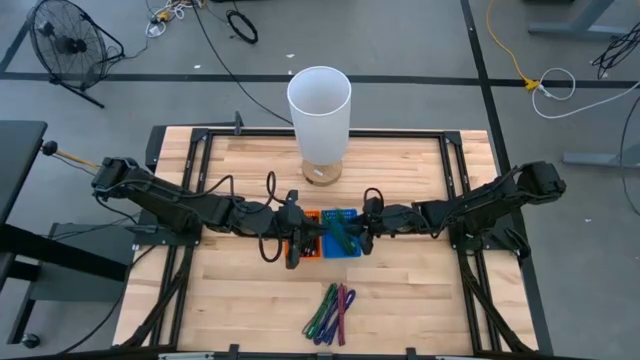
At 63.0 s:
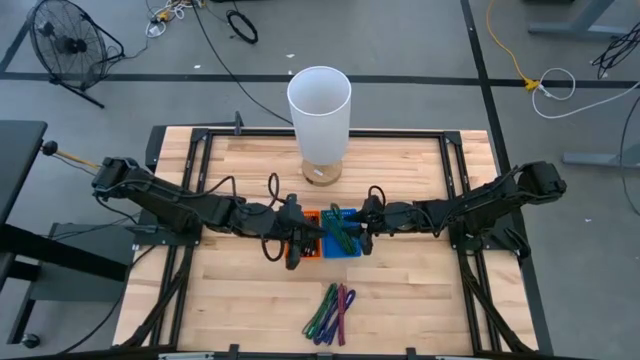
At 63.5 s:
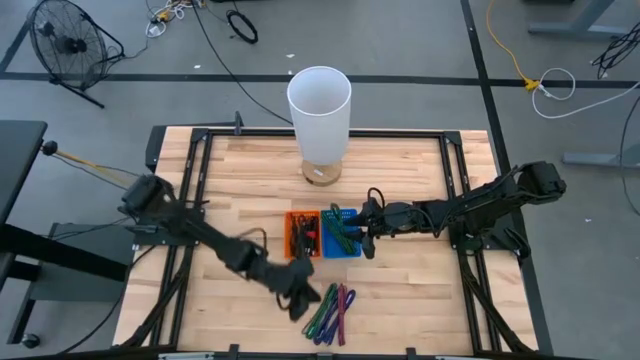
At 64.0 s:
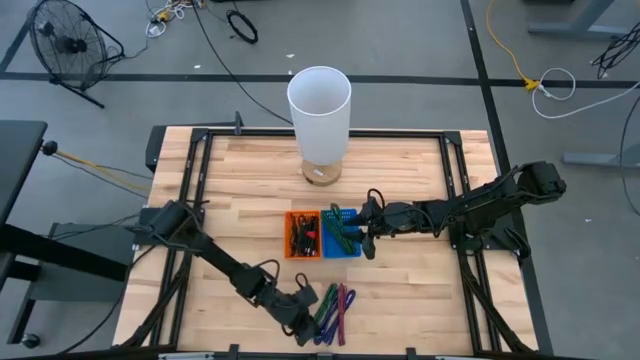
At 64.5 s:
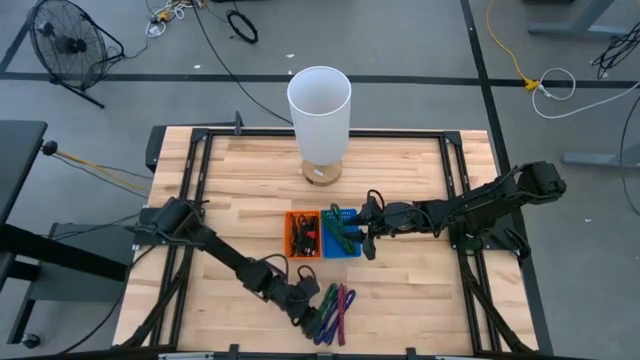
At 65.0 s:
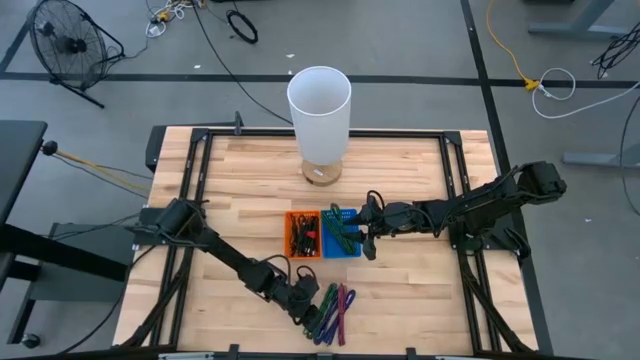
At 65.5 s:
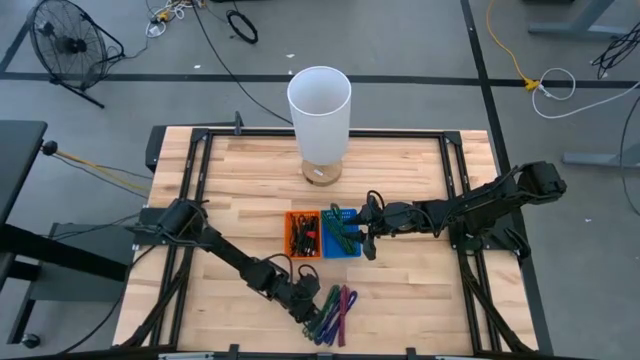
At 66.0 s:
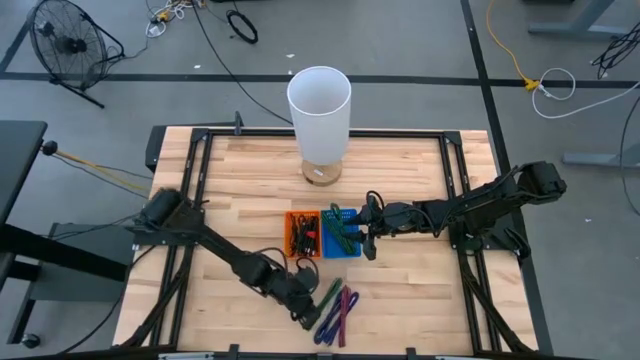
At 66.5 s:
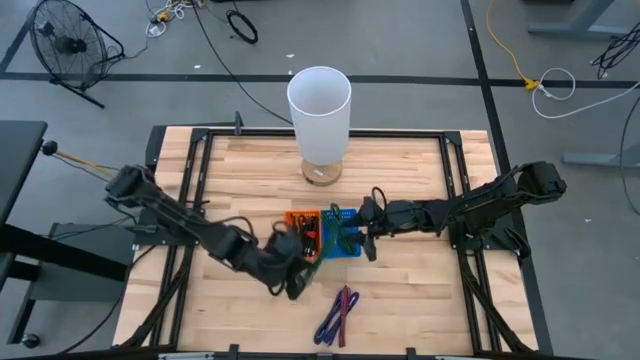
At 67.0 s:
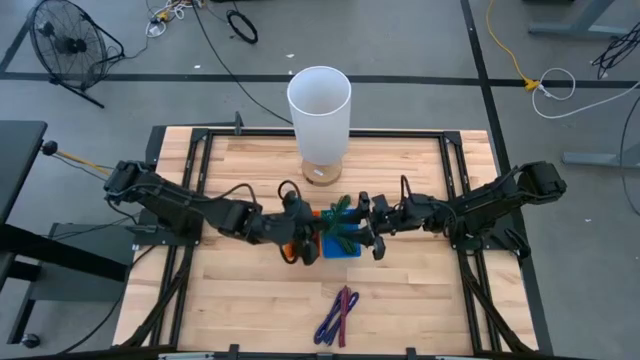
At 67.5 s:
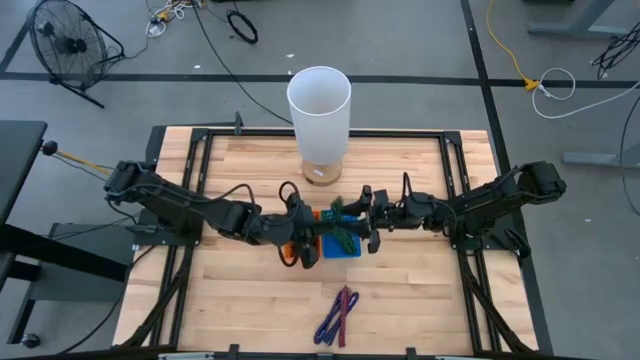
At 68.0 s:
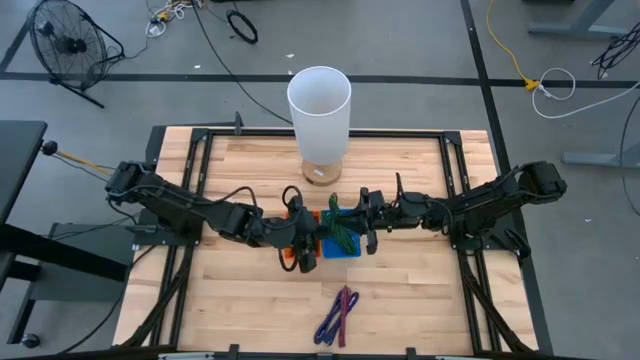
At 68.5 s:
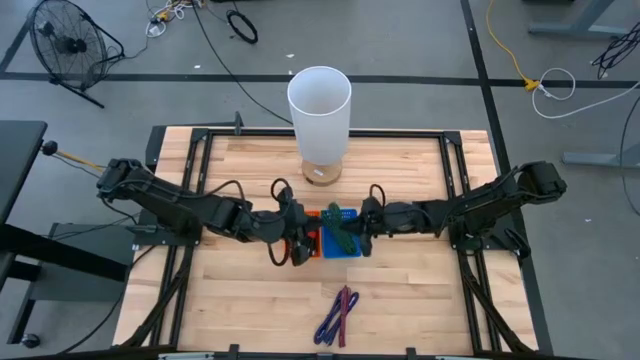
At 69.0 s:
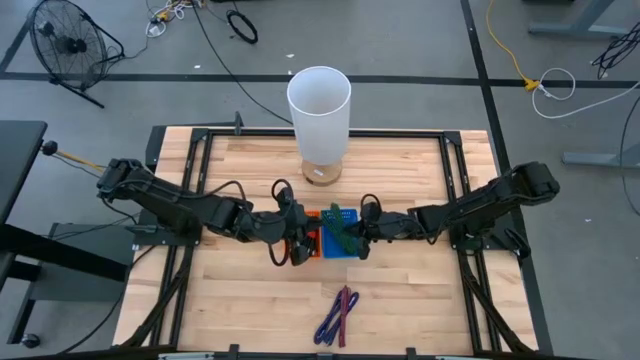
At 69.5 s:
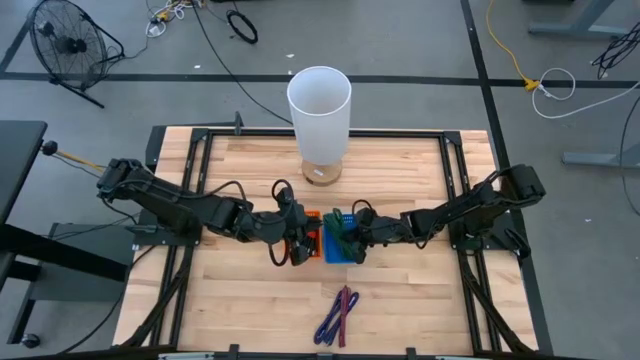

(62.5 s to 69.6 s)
Task: Pick & Place USB Port
Put the green USB cable into the blue bin

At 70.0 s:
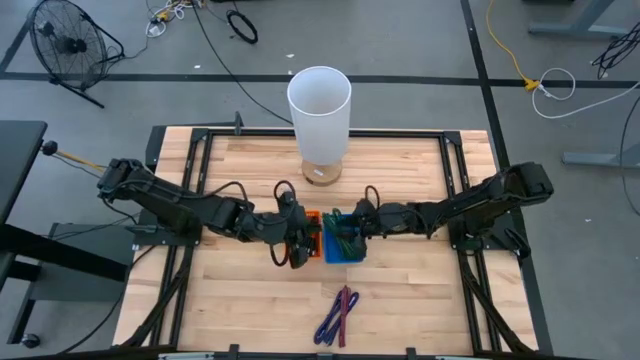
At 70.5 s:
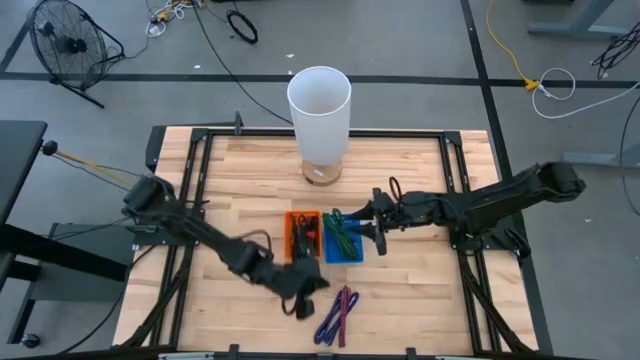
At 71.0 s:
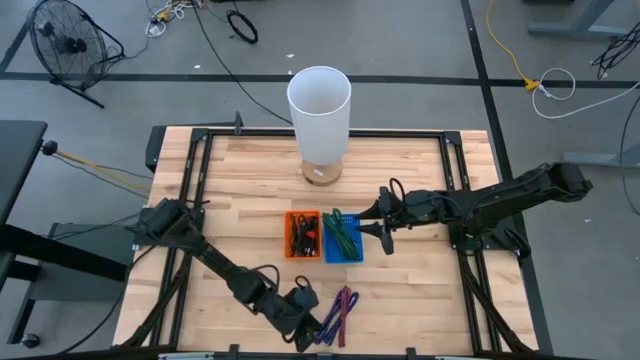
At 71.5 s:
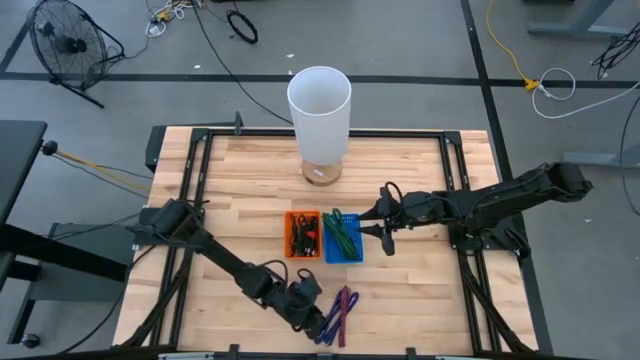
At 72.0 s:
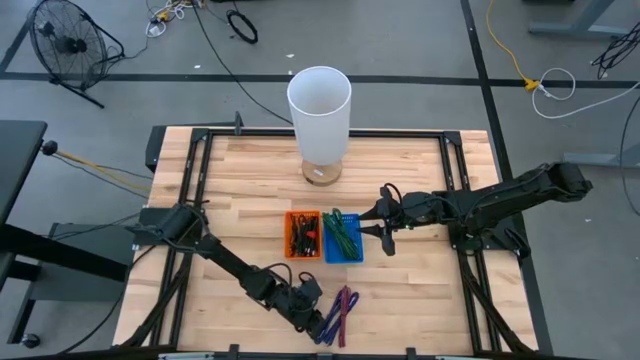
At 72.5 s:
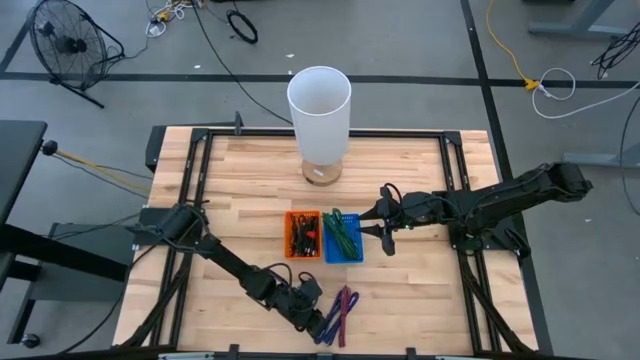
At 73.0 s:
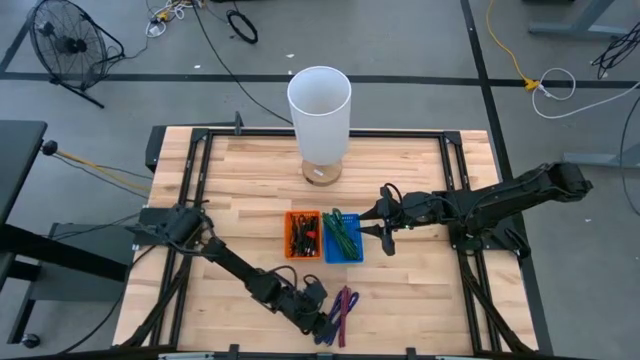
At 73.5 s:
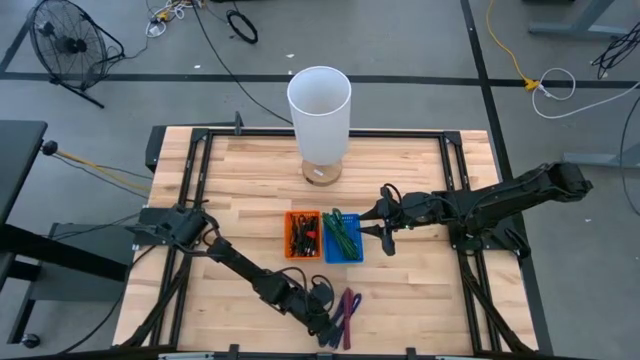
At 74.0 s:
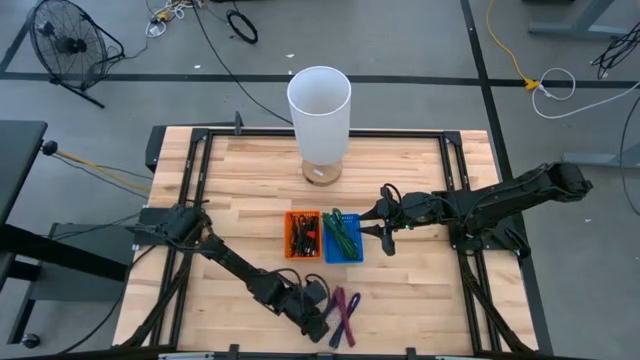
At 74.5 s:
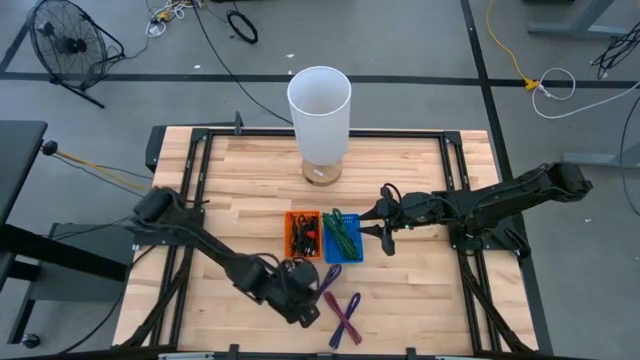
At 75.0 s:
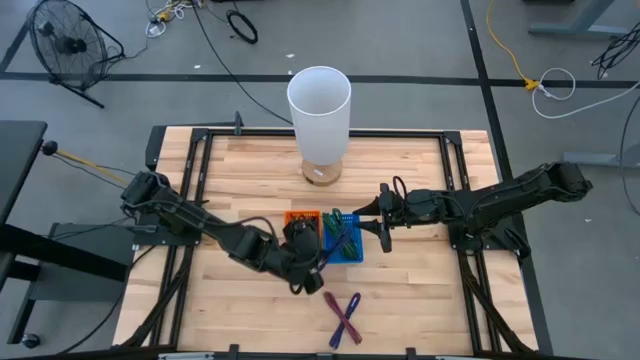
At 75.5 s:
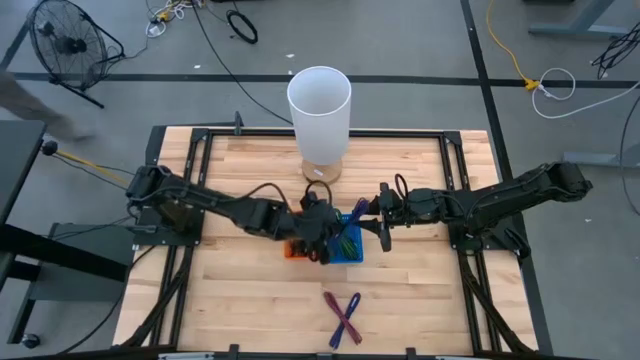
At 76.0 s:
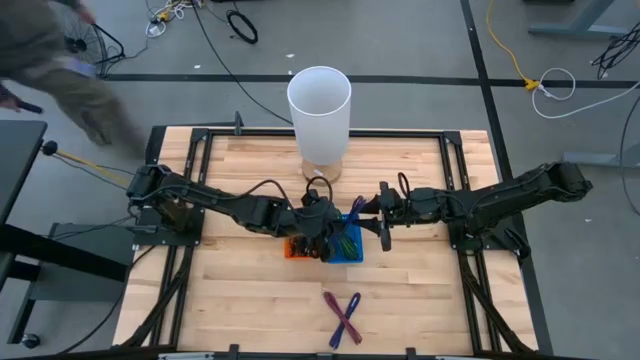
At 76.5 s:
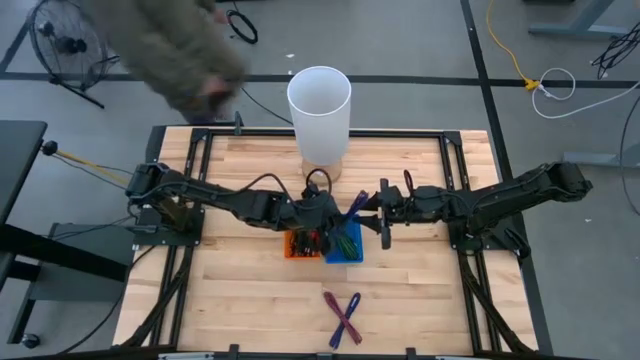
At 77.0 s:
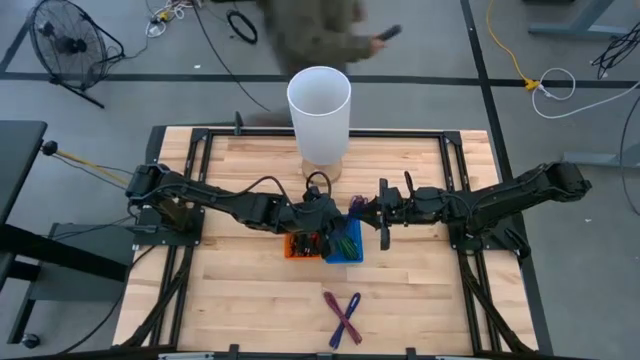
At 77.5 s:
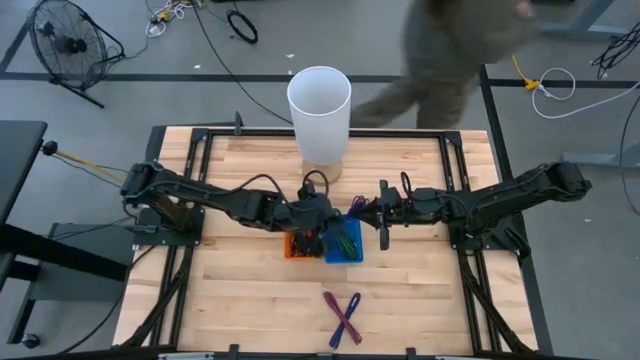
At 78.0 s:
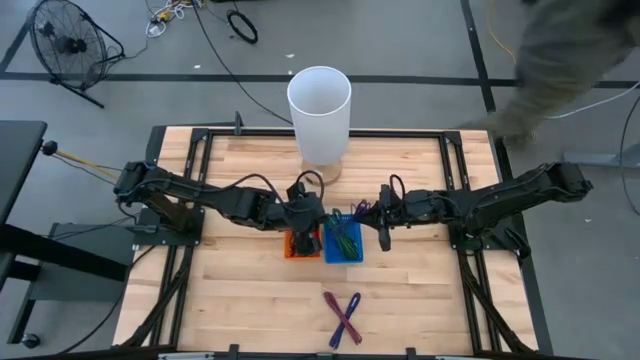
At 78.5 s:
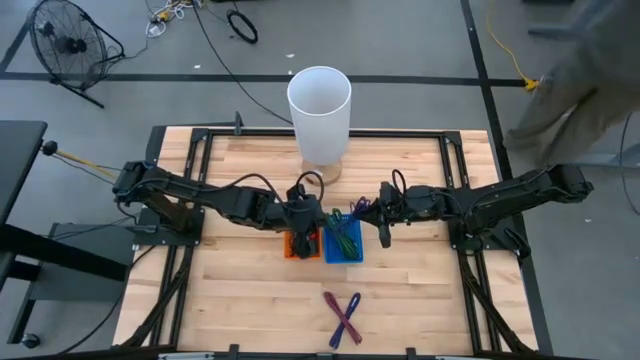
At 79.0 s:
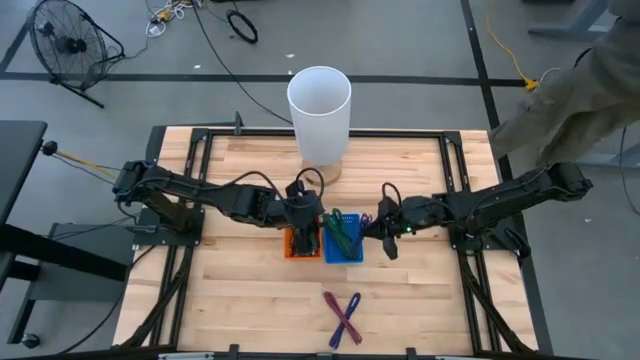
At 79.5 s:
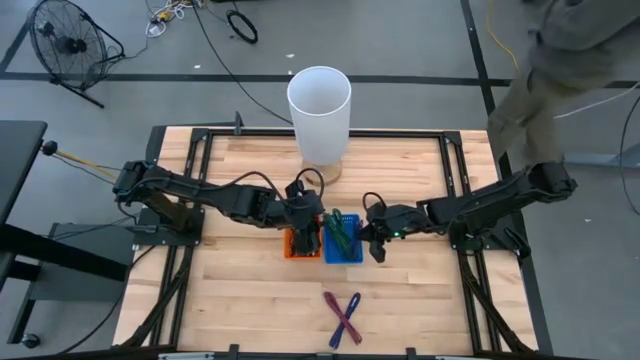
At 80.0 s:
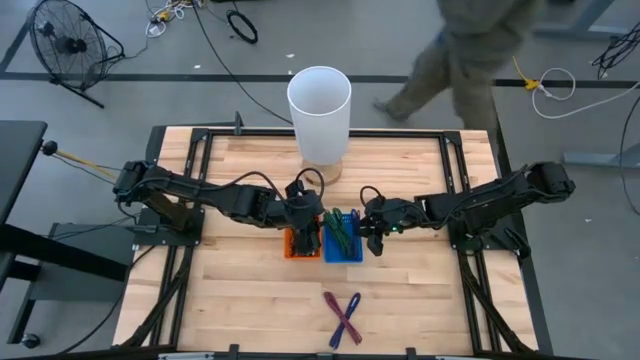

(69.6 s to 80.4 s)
Put the blue USB cable into the blue bin

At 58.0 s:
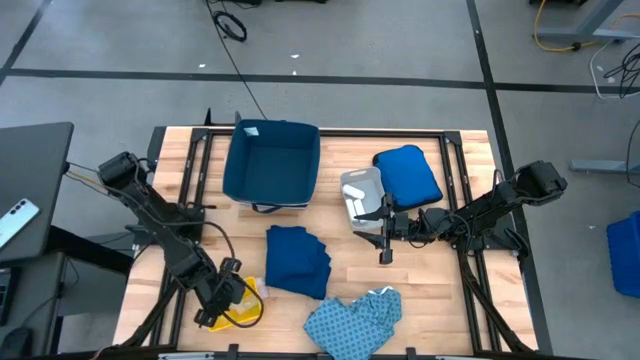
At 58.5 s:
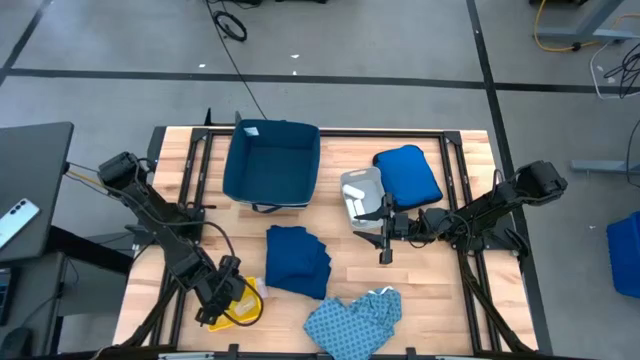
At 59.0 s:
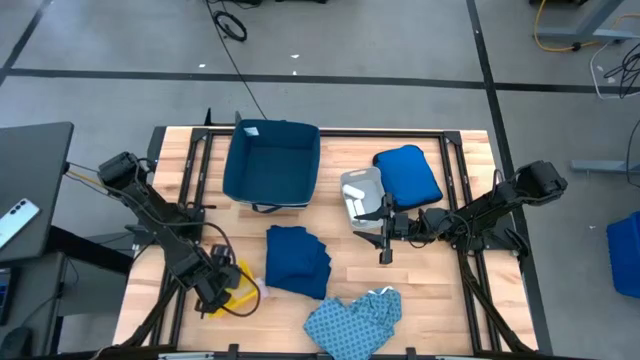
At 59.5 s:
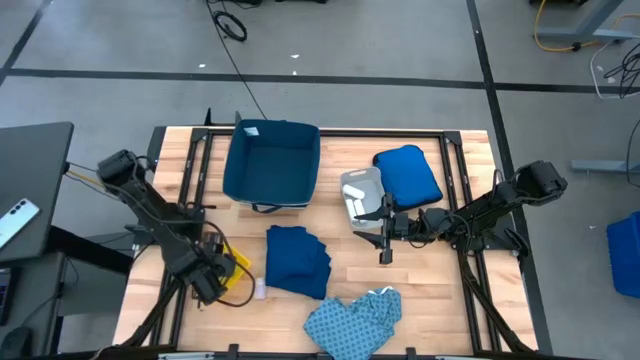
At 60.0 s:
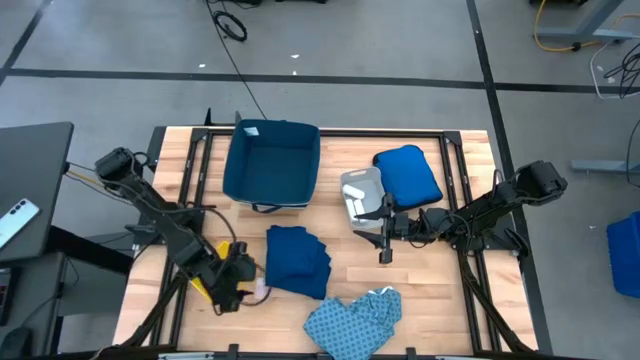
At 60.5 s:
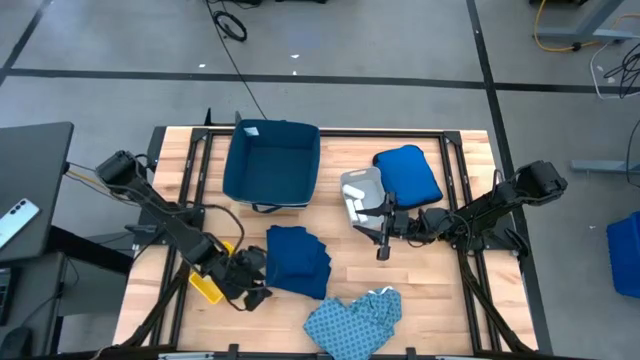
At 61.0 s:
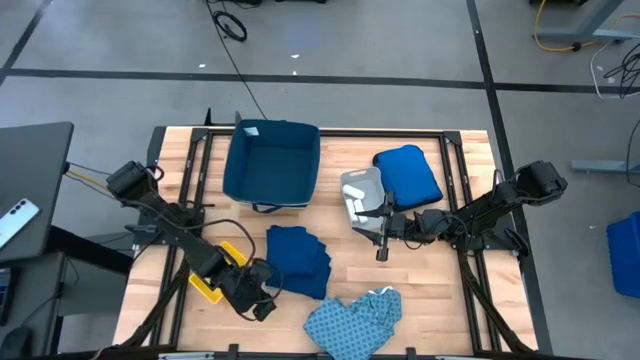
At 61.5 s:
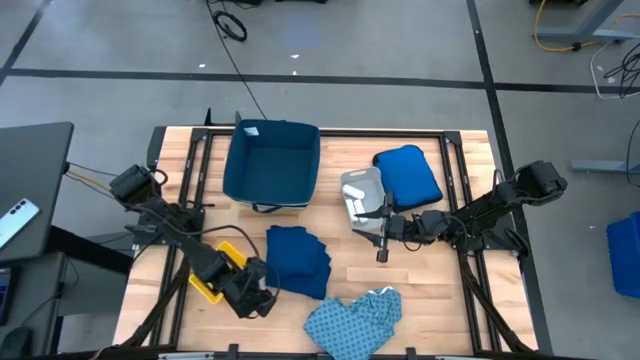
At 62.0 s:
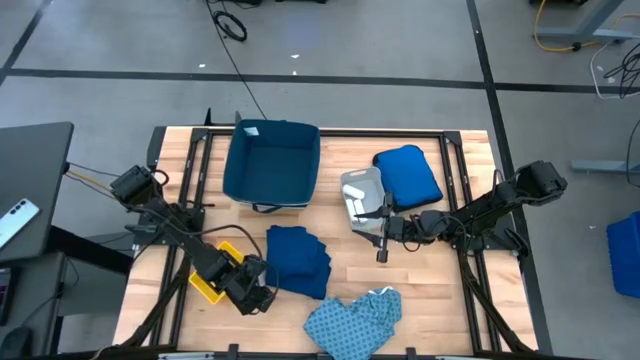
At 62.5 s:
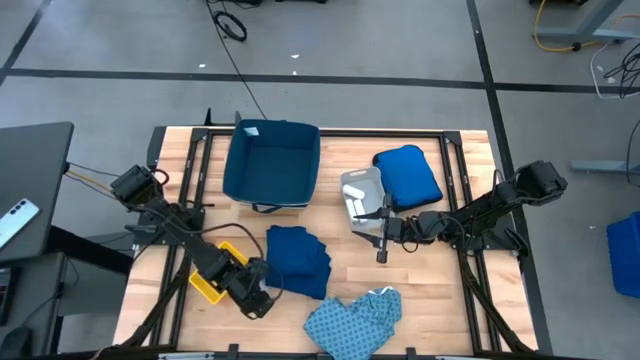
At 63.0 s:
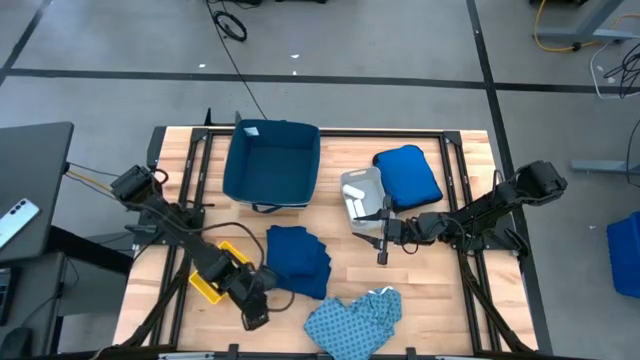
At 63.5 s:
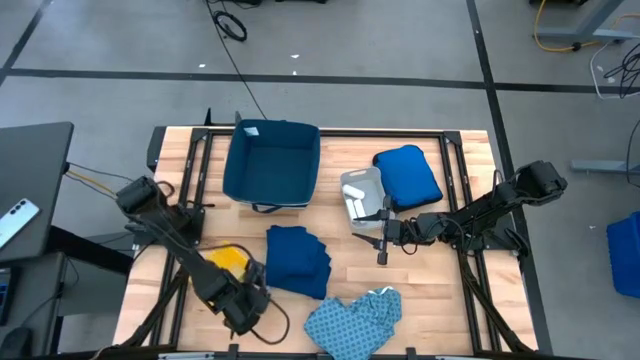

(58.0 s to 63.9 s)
Task: Pick & place medical supplies in basket/bin
Put the transparent pill bottle into the yellow bin
